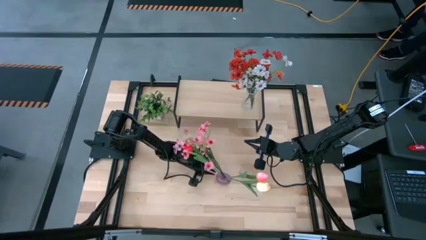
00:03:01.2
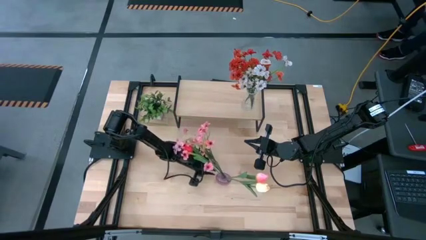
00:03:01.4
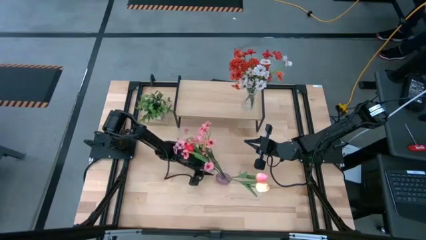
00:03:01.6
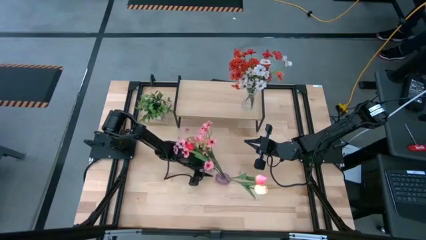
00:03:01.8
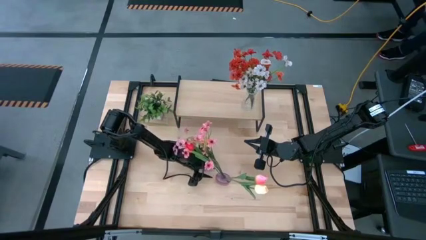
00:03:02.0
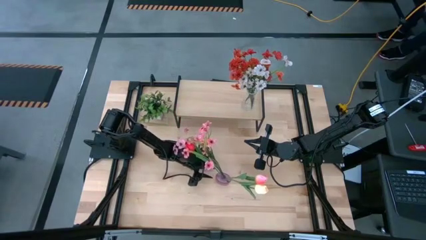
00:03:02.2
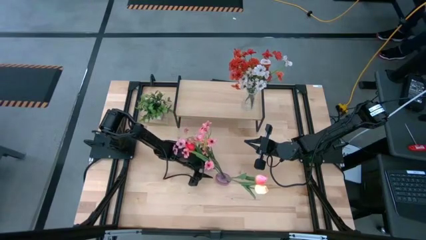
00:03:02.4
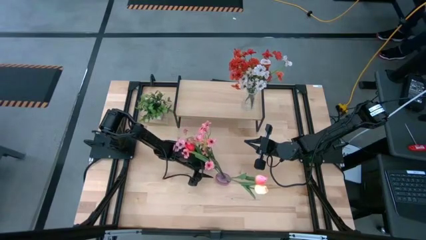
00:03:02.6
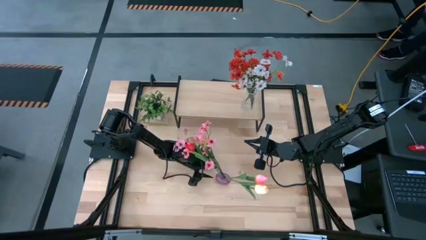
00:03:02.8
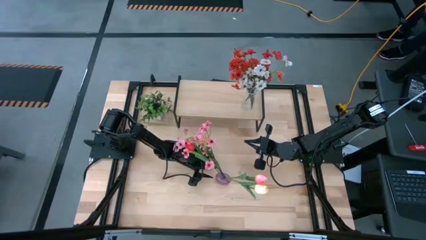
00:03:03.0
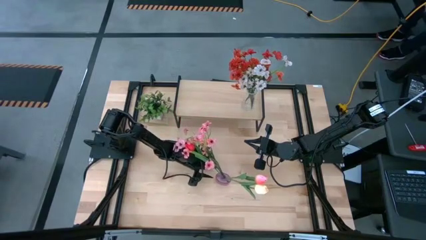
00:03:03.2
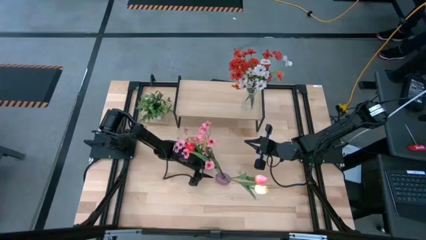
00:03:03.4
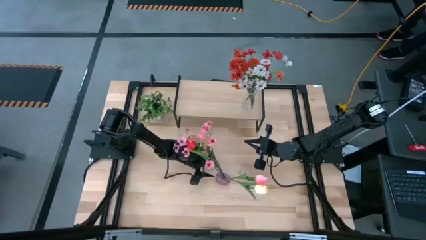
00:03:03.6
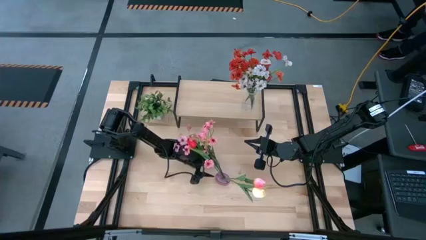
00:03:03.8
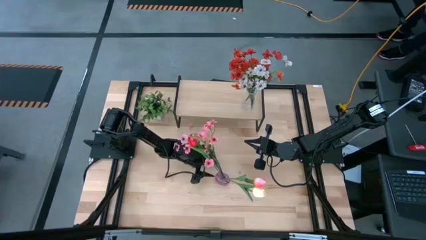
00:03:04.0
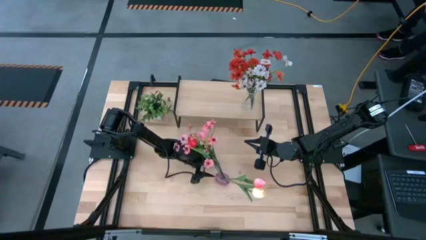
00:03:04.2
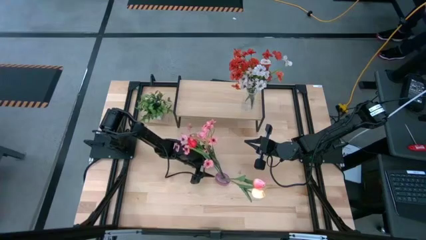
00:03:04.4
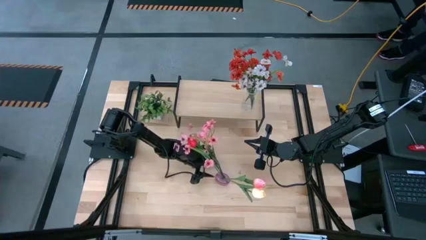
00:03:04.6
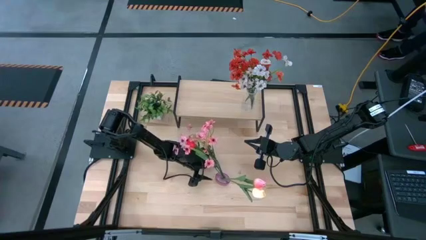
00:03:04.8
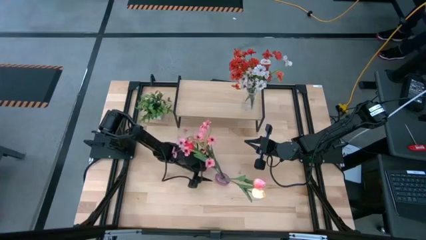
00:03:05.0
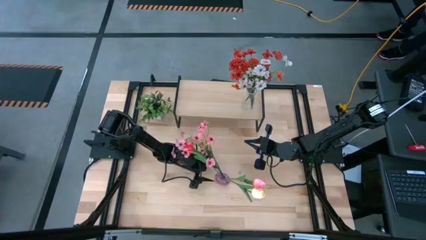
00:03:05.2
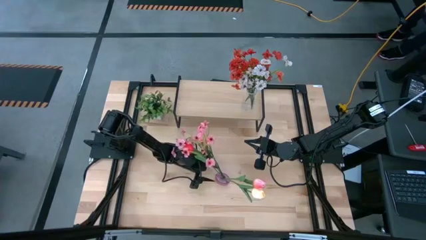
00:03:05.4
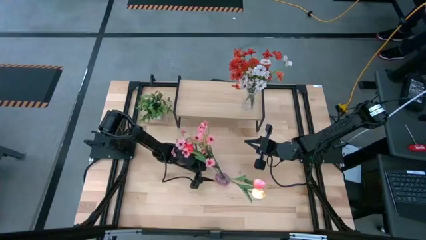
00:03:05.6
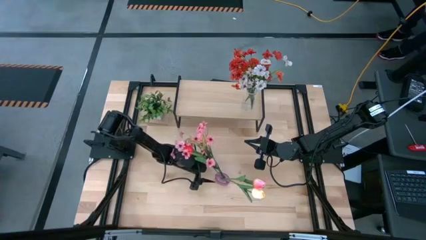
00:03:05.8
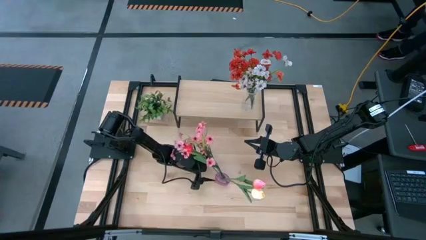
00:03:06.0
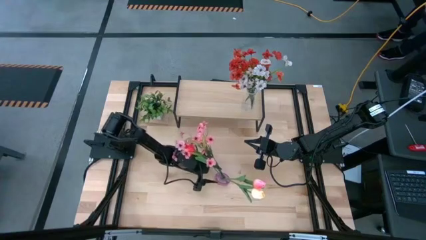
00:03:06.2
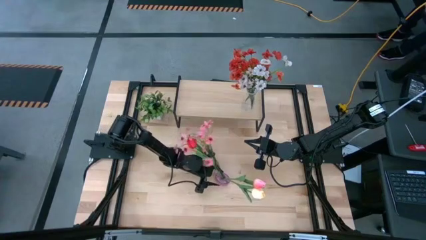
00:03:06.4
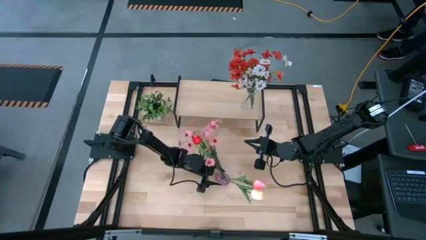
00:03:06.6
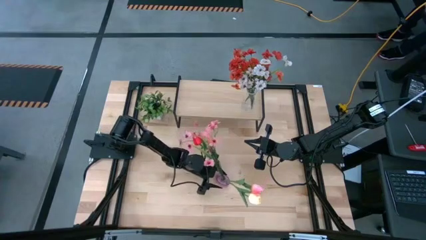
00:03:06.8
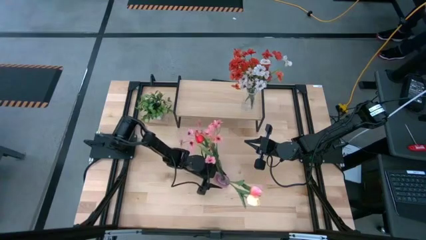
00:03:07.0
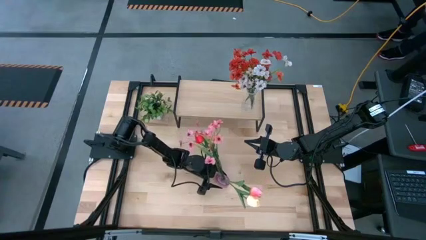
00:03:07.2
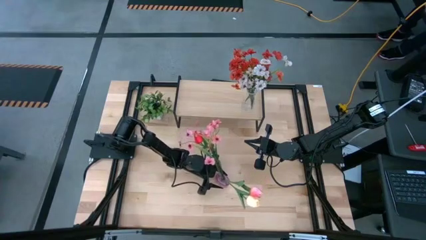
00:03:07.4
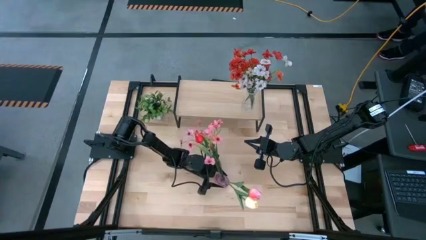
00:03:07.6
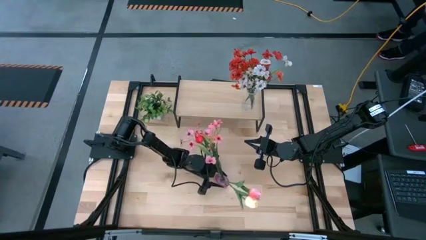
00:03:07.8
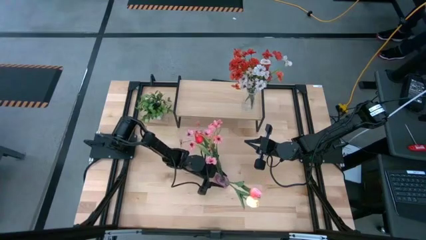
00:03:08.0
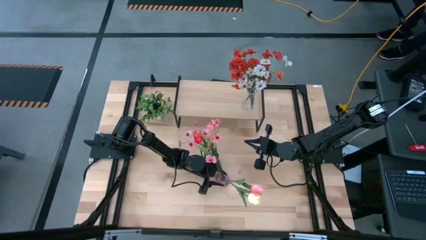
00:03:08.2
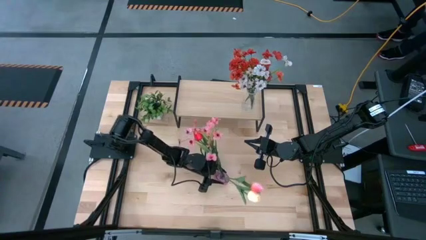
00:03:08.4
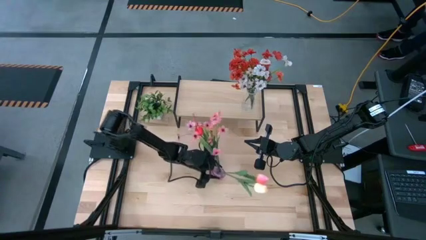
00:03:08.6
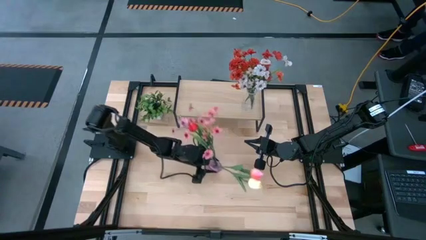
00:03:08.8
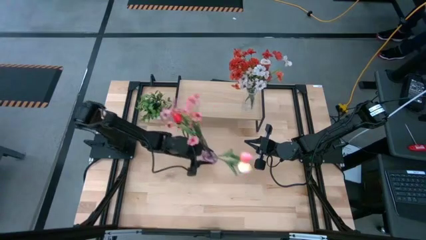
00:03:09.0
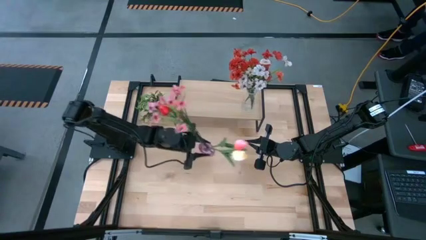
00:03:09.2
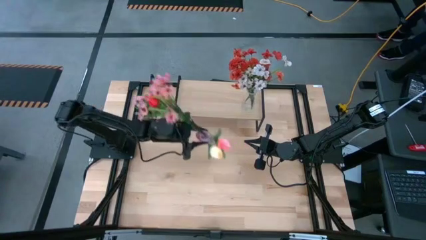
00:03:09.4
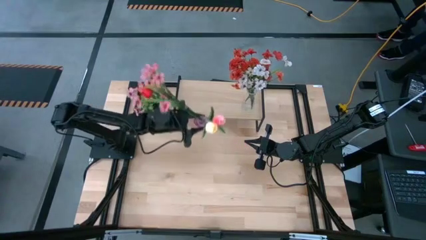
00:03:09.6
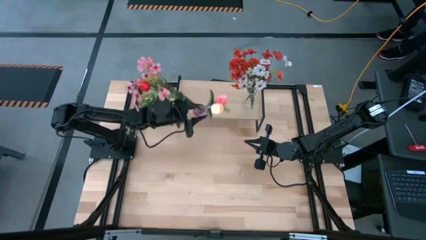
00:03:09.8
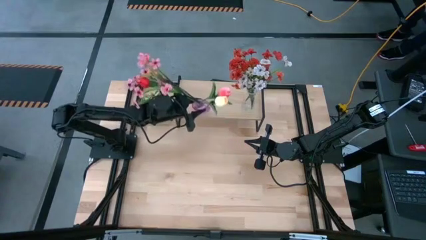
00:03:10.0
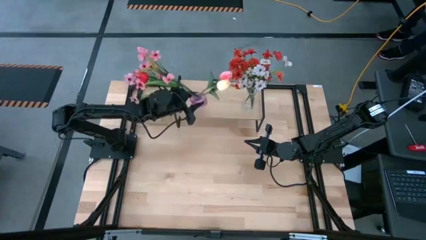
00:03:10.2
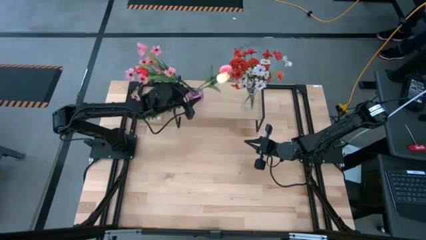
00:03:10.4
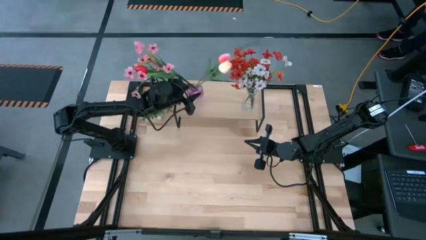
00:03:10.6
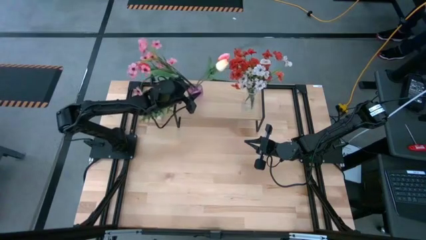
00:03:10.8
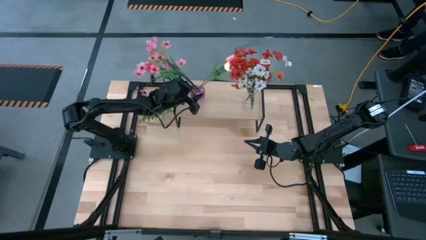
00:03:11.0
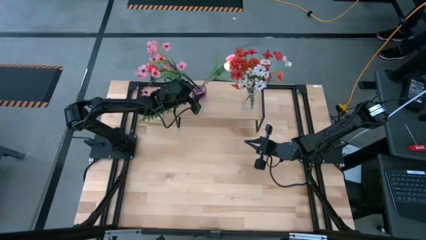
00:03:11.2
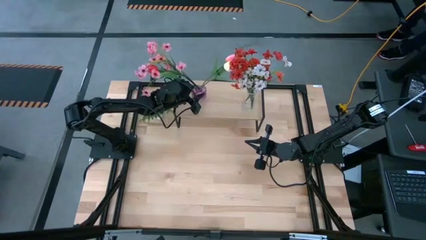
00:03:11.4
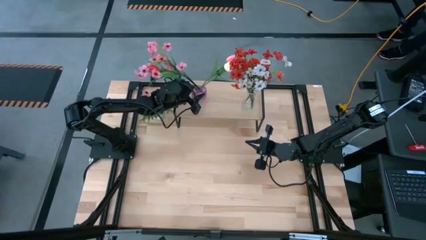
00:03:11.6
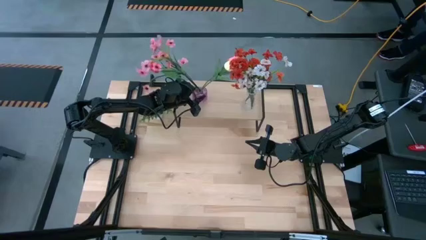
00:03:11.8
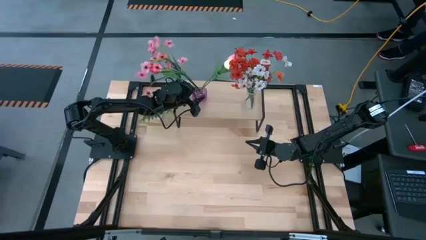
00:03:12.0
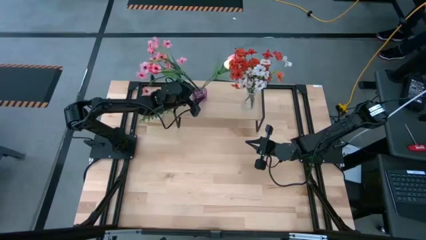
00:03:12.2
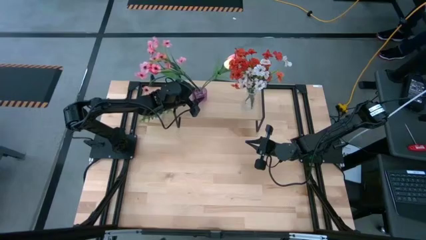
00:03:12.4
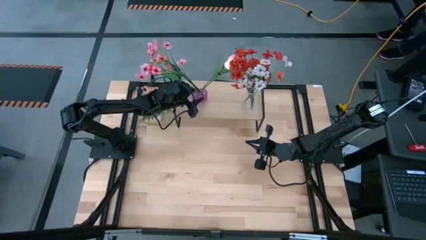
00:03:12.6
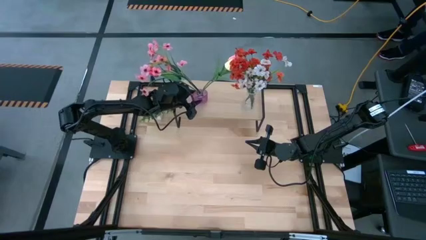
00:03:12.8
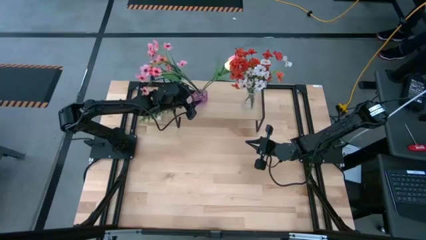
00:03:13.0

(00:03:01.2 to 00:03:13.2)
Task: Pick and place flowers into a vace then onto a shelf
Put the purple vase with flowers on the shelf

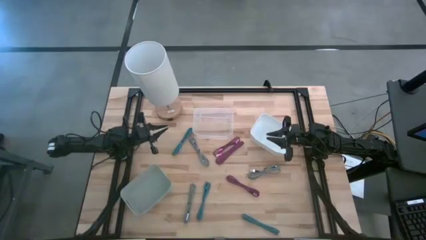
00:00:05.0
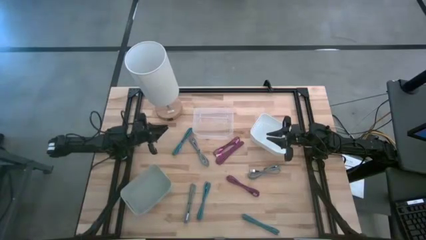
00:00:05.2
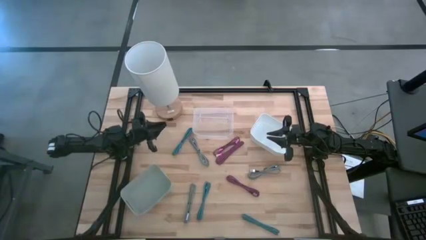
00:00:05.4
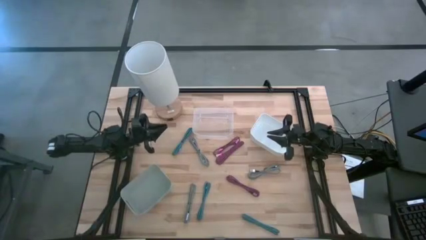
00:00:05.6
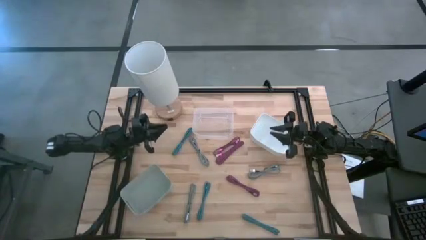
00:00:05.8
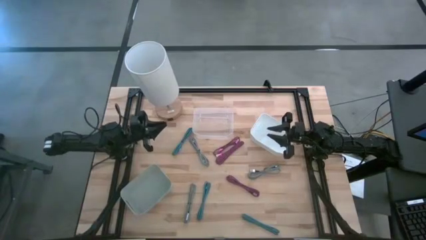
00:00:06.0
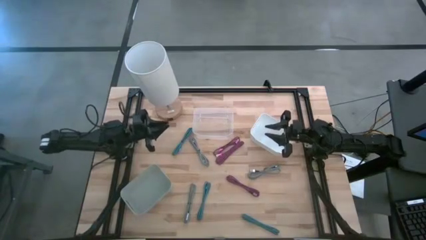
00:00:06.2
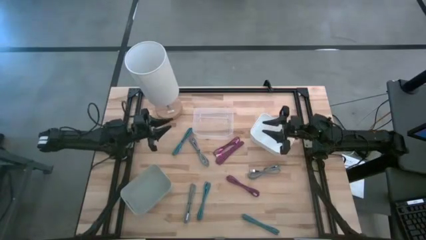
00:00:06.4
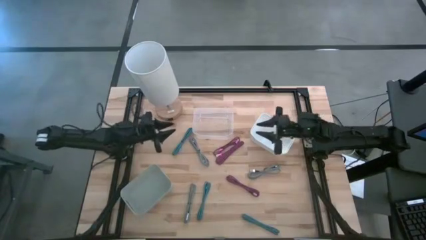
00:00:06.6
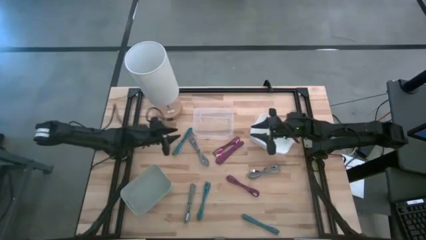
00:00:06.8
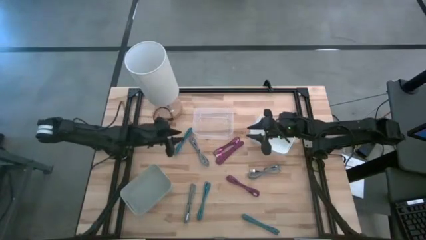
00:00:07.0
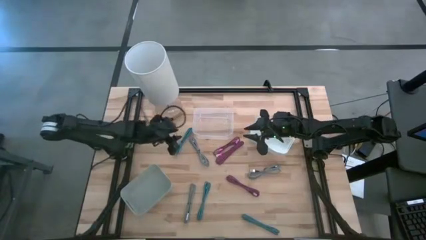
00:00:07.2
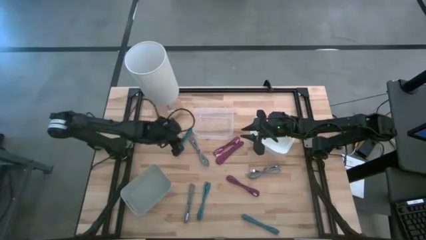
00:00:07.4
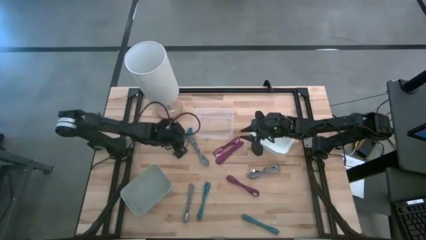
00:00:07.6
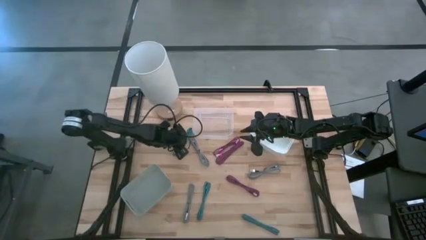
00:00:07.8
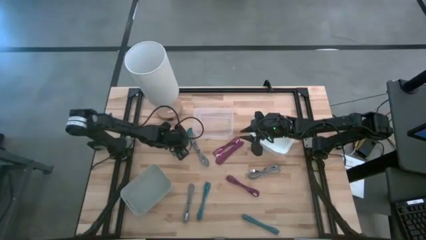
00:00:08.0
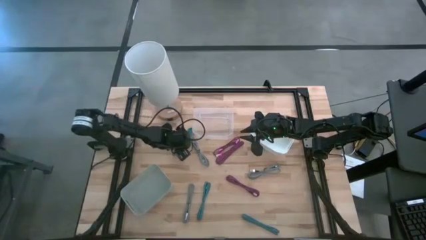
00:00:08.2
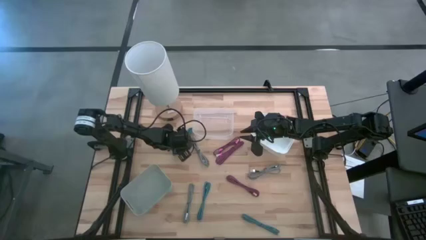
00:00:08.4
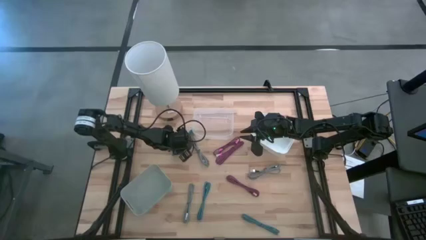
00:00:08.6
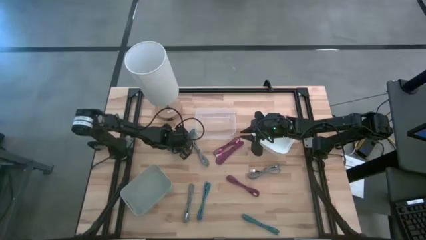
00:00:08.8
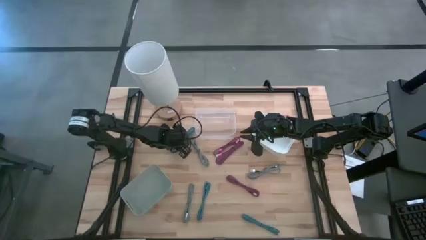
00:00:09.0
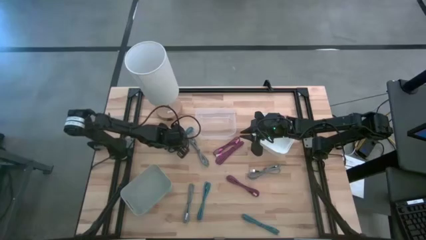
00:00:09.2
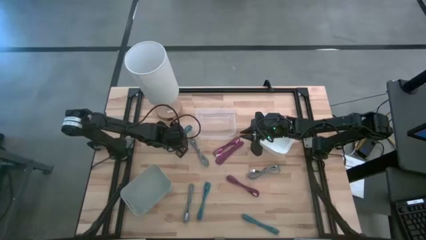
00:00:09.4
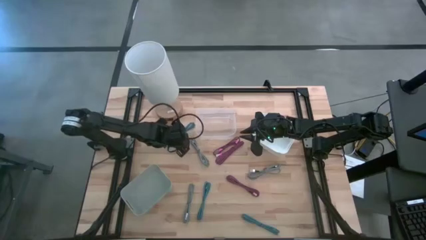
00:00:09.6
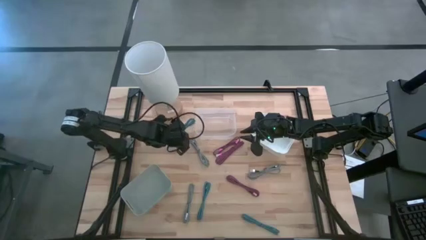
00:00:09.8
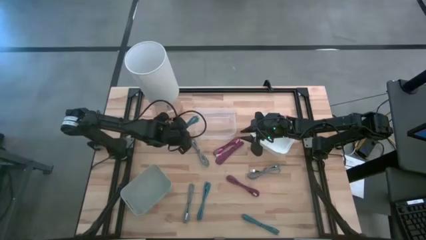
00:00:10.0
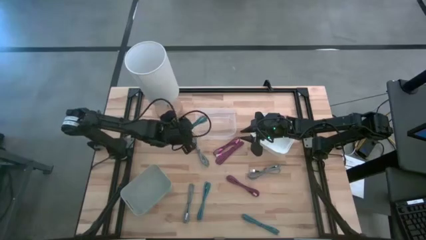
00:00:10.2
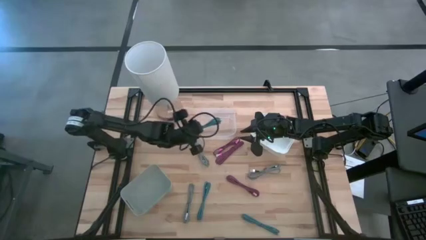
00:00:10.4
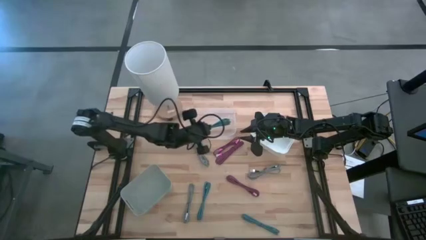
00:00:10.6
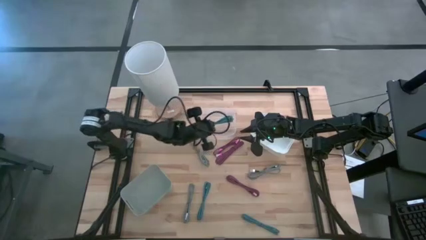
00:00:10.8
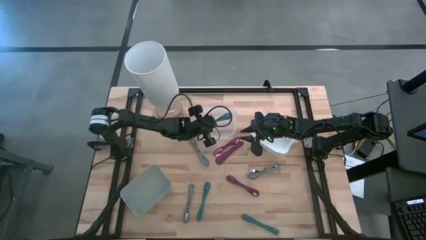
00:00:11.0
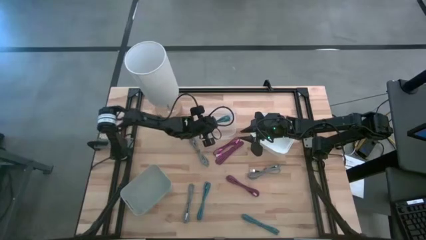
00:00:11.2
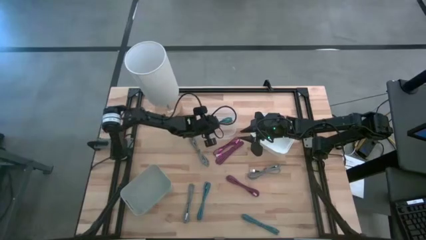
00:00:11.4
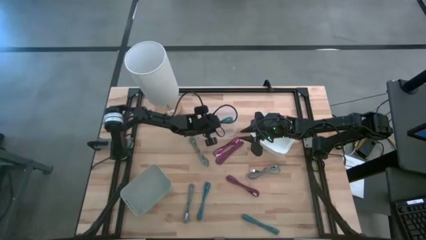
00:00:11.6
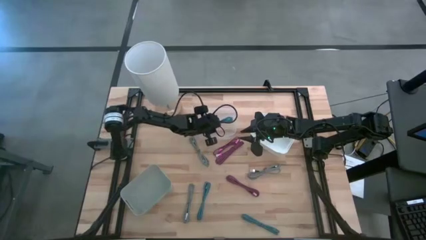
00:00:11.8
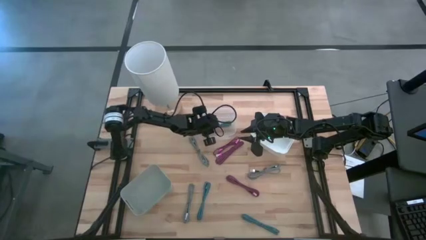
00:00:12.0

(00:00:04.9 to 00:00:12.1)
Task: Pick & Place USB Port
Put the top blue USB cable into the transparent bin
